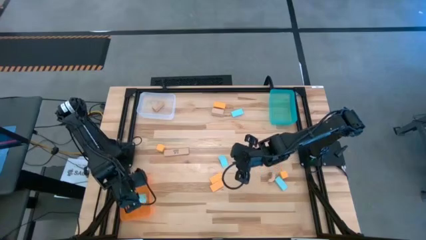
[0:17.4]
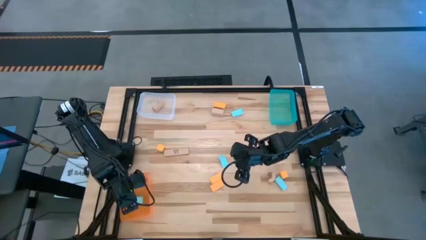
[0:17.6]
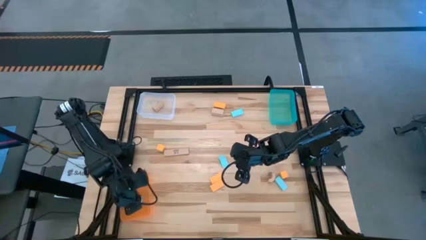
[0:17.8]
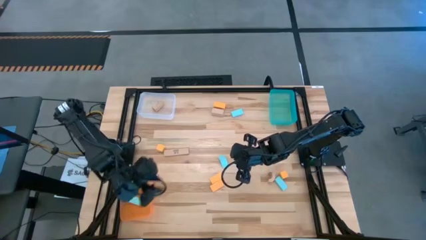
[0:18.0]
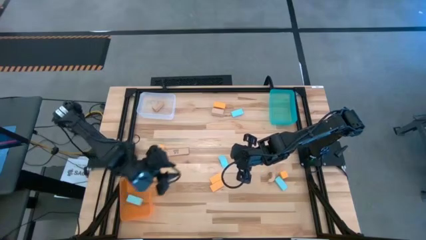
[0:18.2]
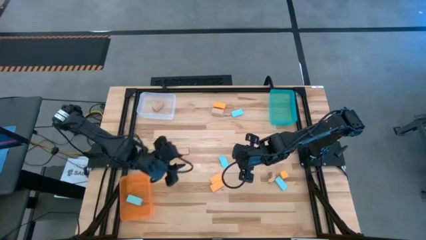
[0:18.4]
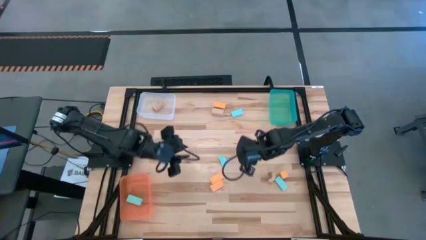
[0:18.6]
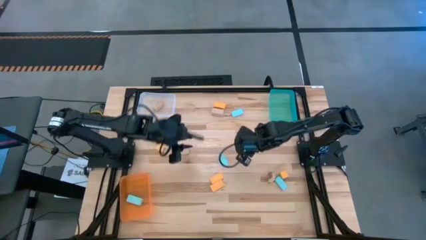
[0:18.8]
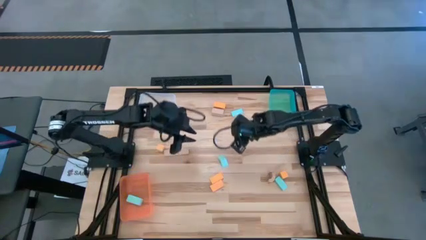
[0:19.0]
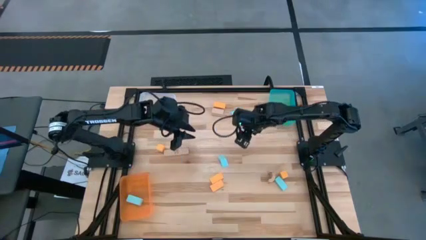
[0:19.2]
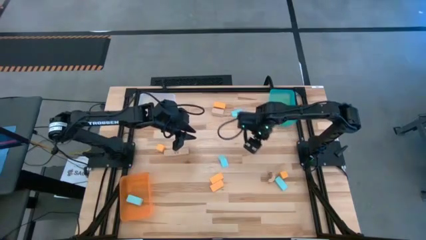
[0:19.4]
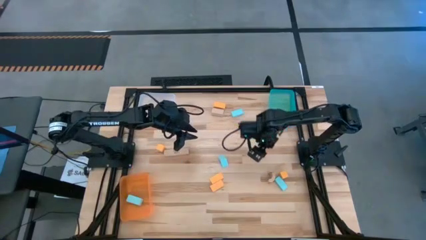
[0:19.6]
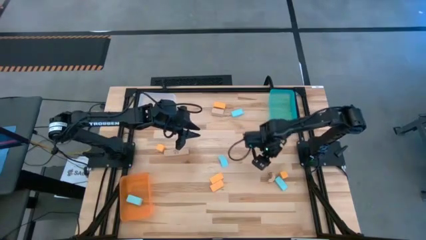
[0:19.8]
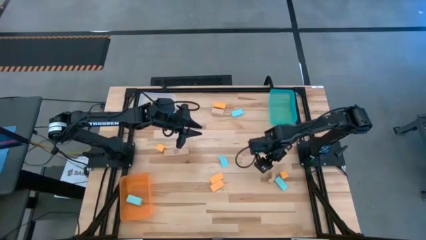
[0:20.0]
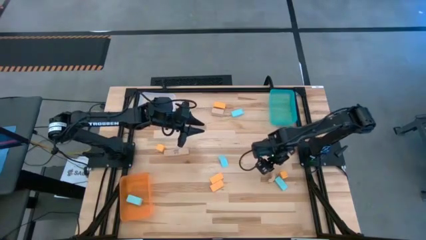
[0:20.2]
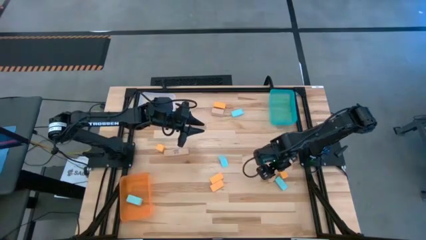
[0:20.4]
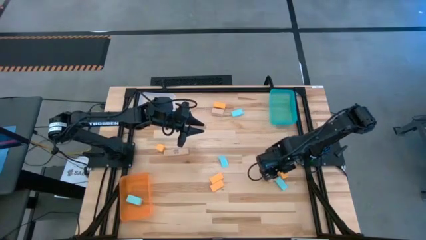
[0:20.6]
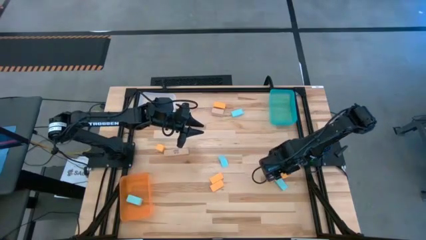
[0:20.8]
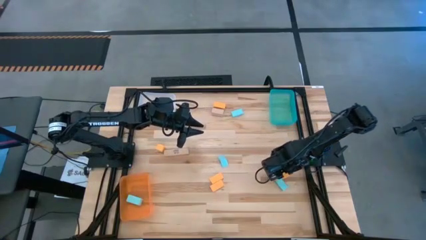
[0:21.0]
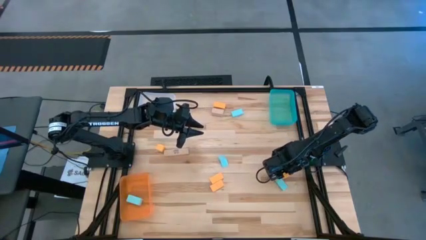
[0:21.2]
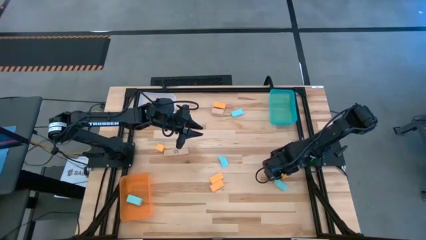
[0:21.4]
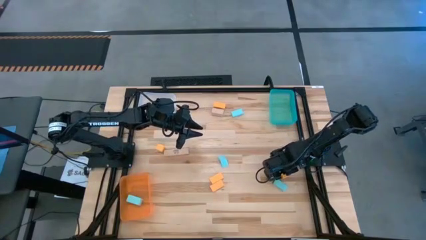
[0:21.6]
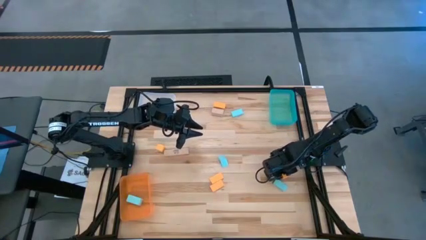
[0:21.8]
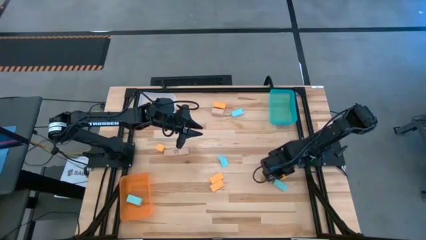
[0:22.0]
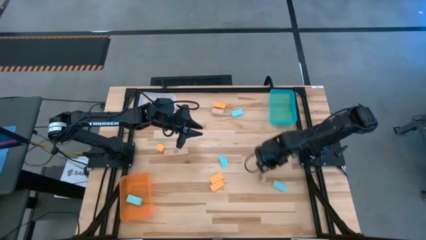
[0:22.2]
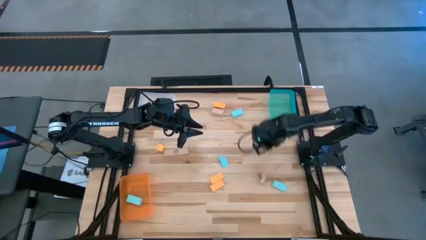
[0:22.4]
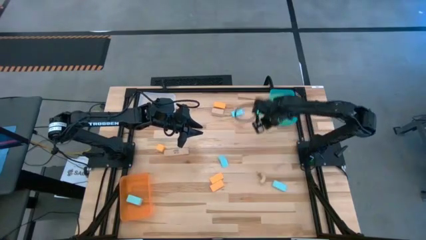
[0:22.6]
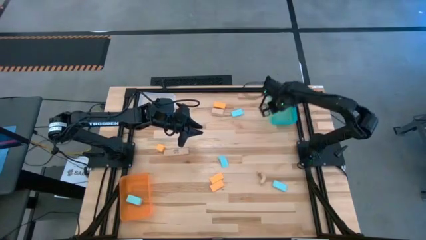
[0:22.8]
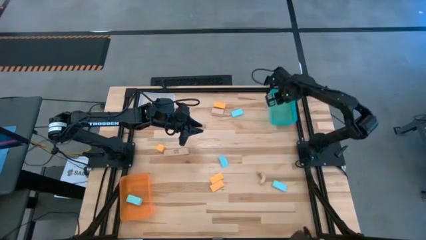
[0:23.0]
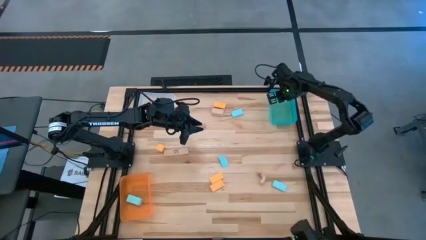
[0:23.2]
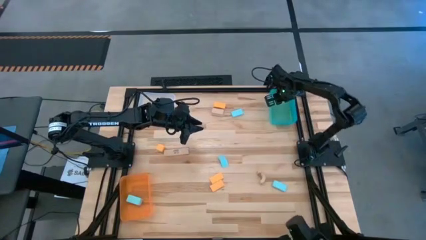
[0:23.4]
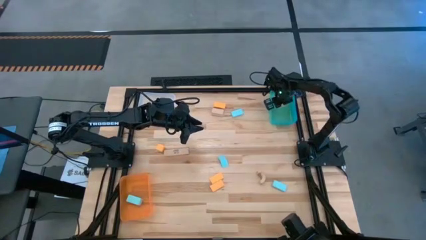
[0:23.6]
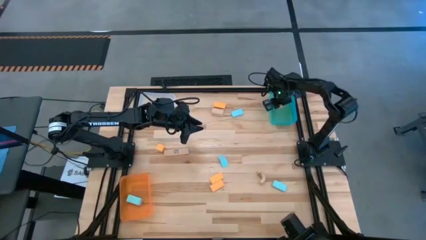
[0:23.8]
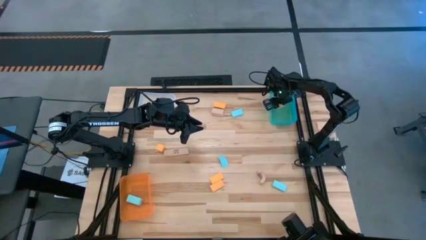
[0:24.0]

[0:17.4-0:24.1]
Task: Sort & place blocks by color
Put the orange block into the light blue bin

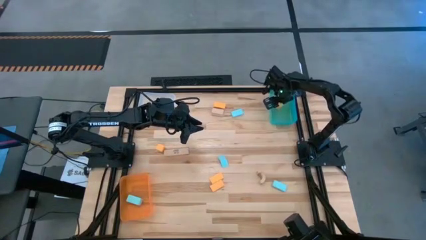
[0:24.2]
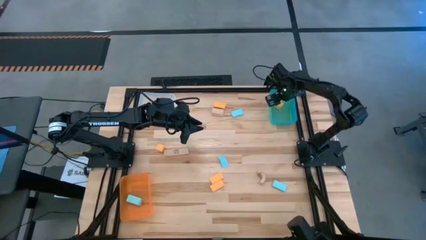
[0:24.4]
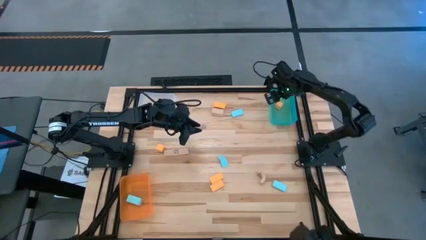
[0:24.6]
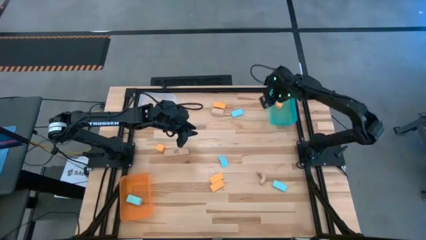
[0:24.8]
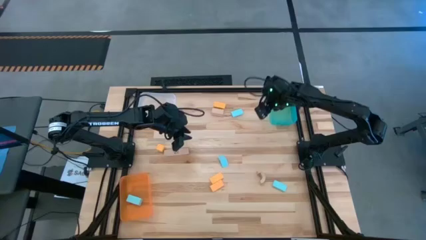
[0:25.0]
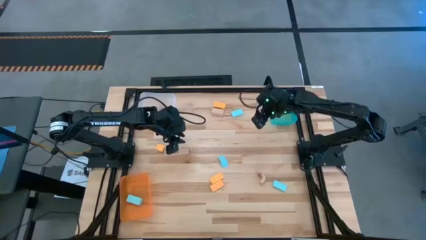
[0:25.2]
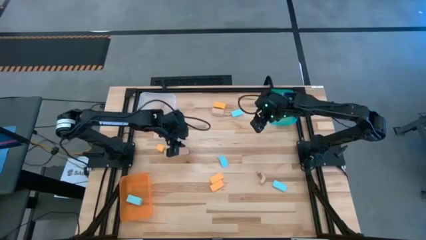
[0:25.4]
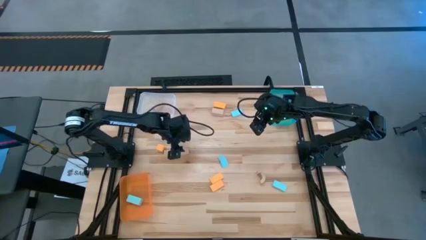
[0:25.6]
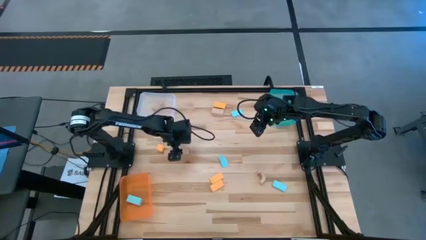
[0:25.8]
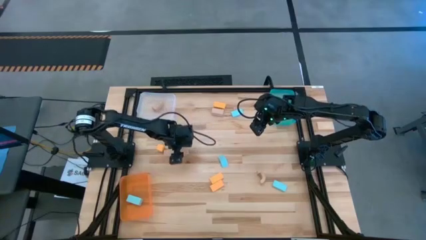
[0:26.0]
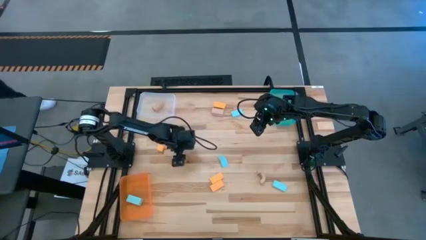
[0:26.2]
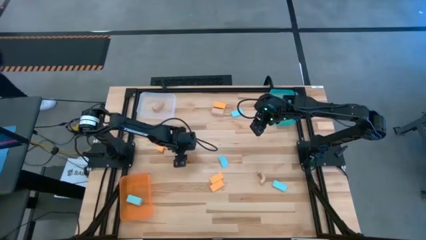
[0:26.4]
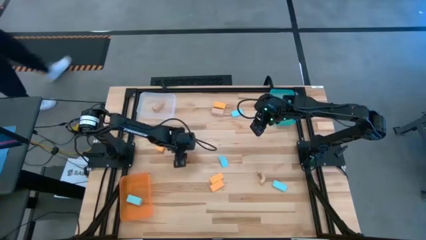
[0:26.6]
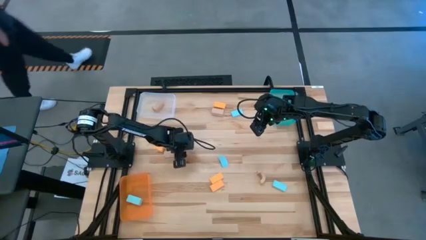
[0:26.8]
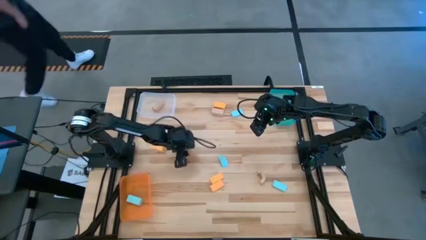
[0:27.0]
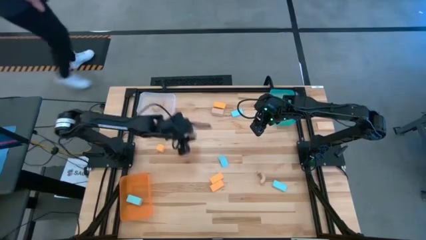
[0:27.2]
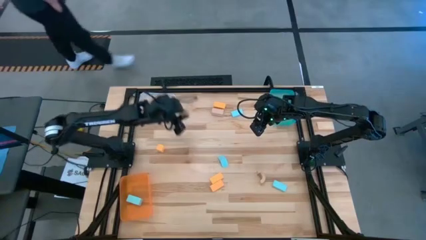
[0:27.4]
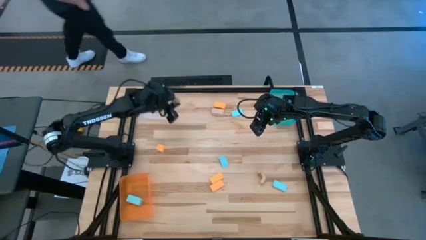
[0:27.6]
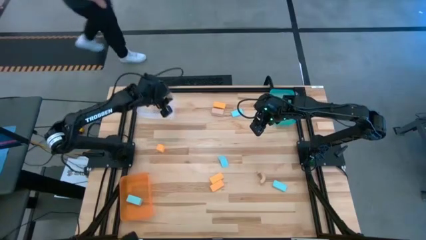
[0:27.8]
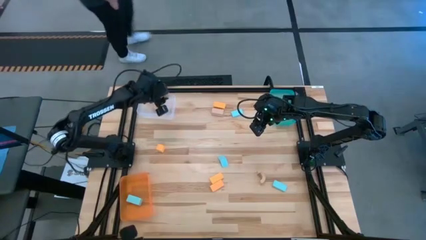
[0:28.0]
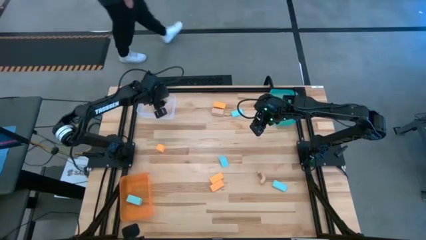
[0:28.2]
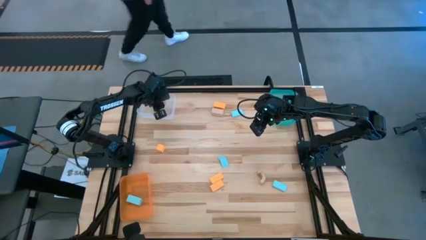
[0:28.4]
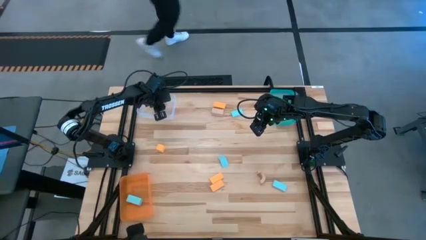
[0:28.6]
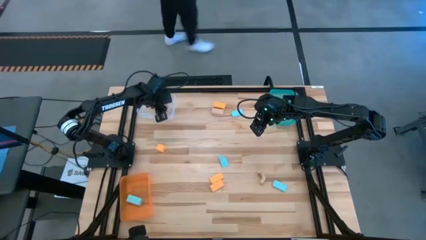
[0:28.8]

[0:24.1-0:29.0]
Put the brown block into the transparent bin

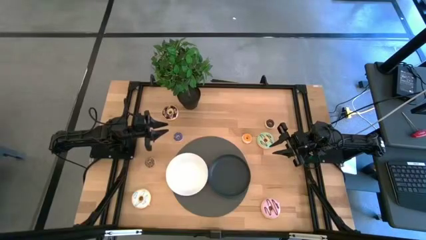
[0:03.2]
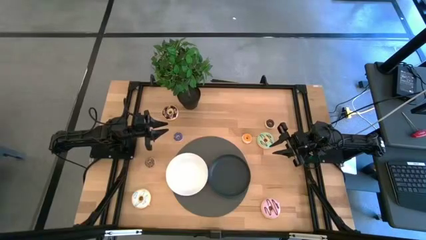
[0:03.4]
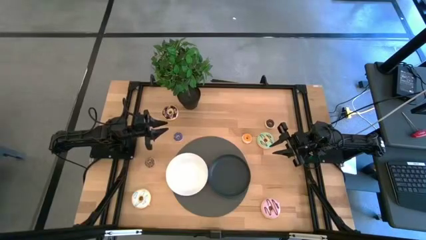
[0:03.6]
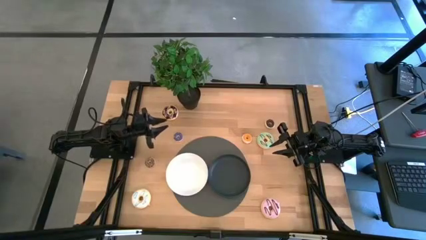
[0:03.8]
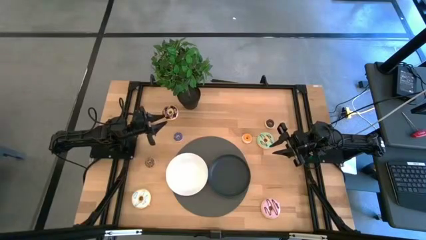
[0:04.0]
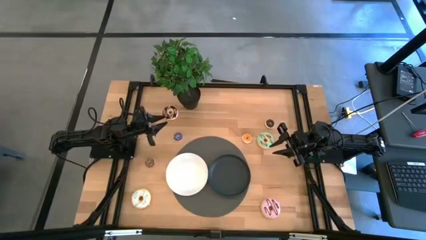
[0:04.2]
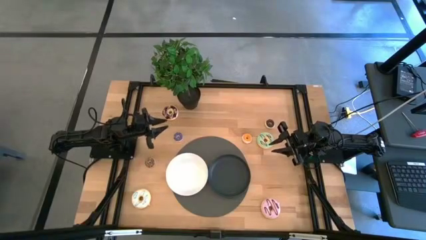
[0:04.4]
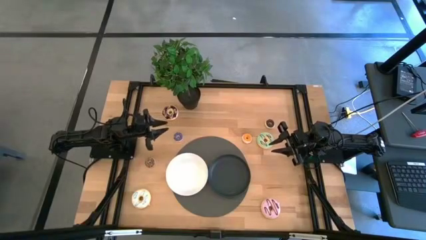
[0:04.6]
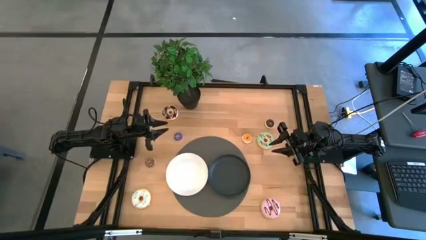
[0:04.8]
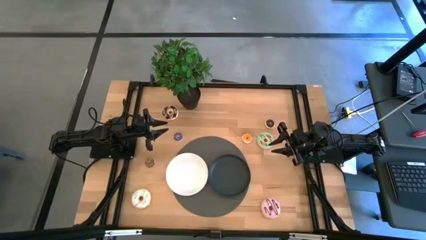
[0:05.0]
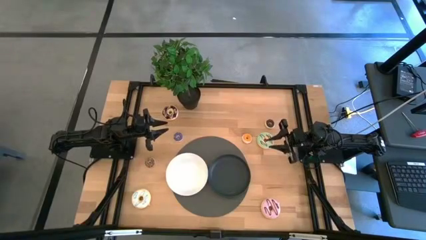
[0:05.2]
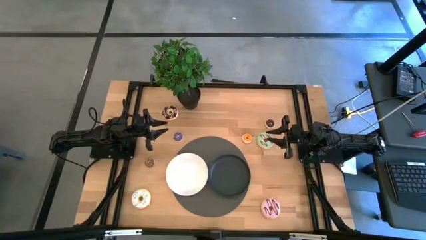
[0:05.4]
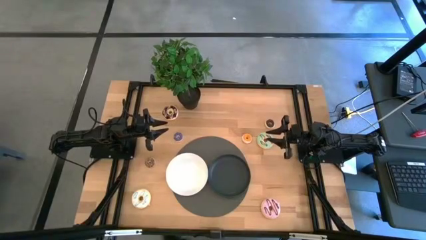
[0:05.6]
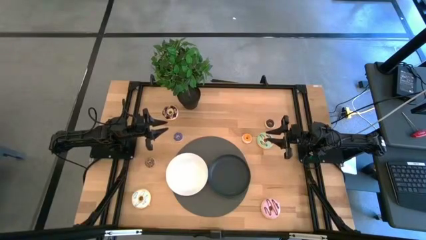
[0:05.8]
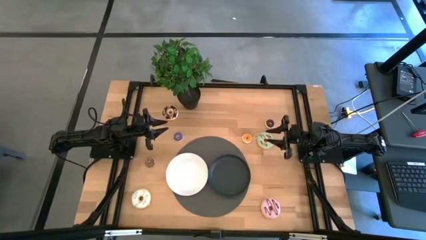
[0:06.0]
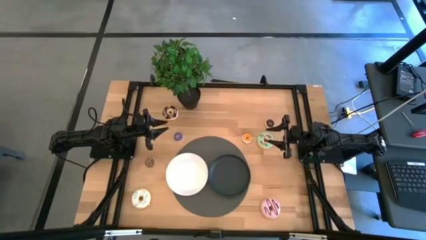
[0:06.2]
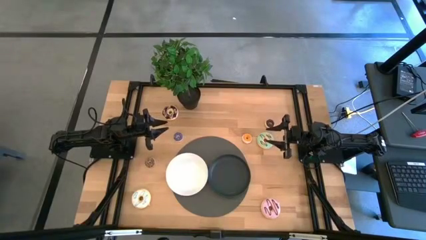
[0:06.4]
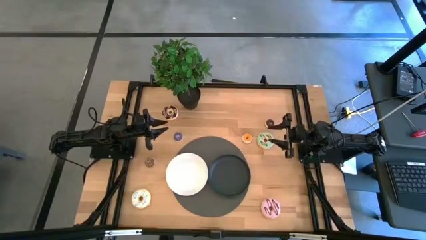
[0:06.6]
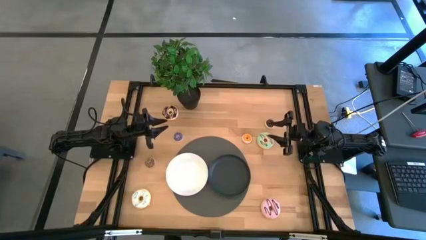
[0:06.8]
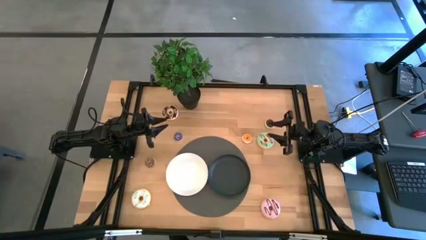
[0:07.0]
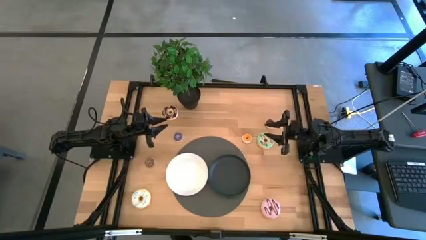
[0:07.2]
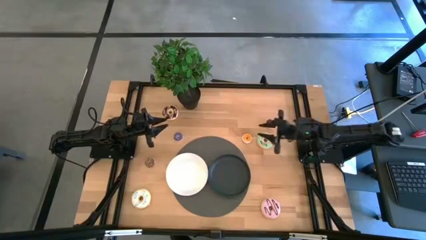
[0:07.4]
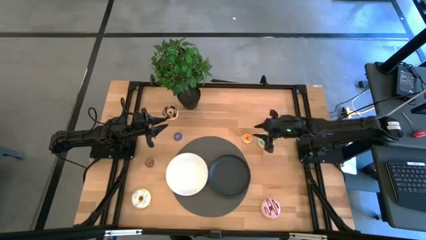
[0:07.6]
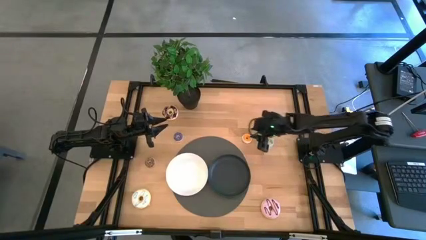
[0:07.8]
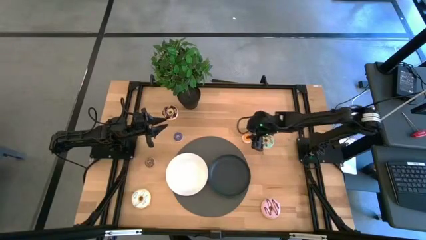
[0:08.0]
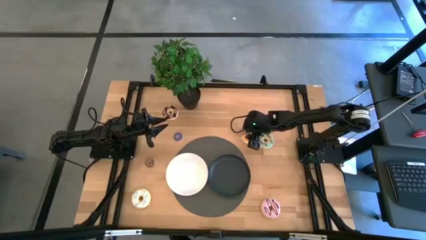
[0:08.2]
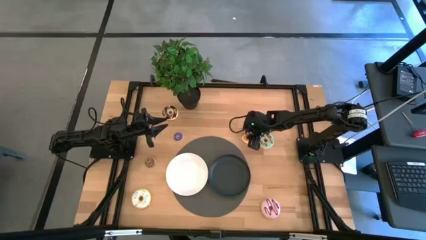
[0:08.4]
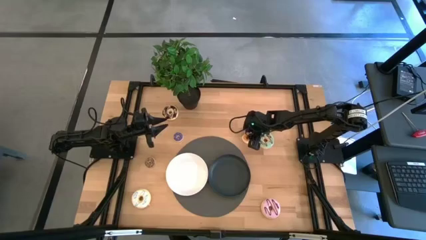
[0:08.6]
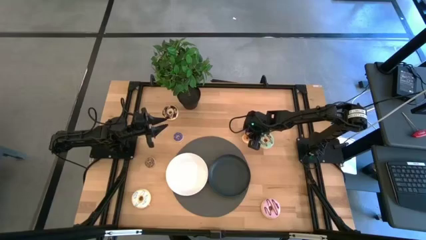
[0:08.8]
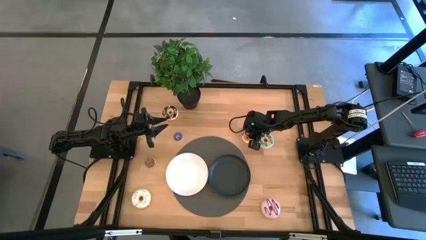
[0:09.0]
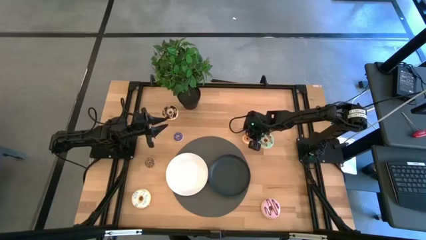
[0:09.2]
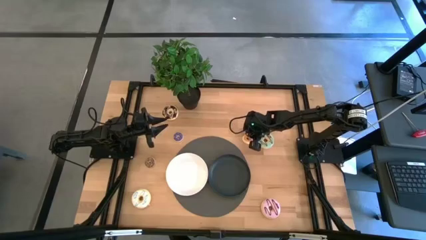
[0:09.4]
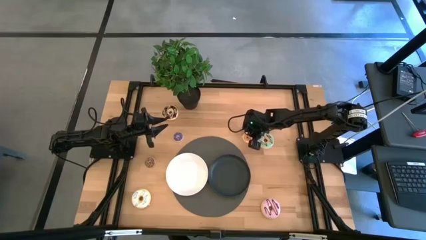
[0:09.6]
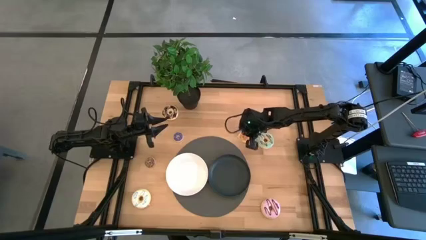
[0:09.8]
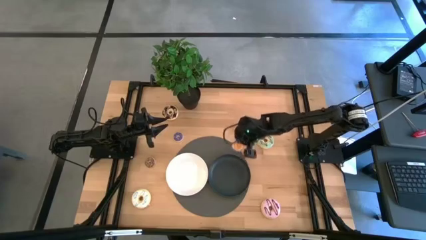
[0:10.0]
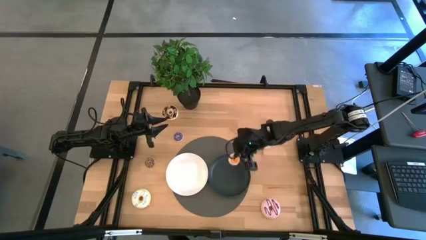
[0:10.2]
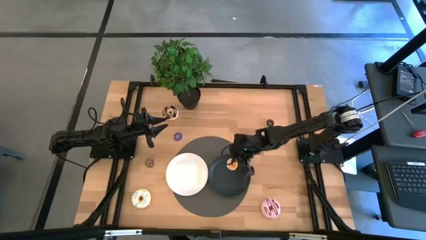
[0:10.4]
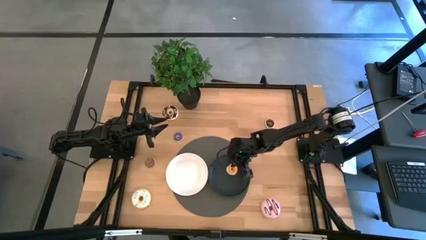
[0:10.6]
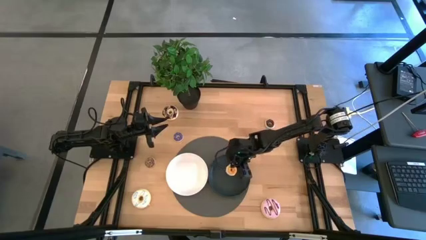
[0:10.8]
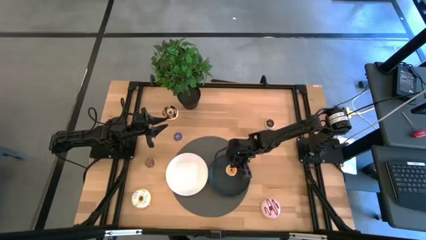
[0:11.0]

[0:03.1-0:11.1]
Task: Pick & Place donuts
Put the small orange donut on the black plate
